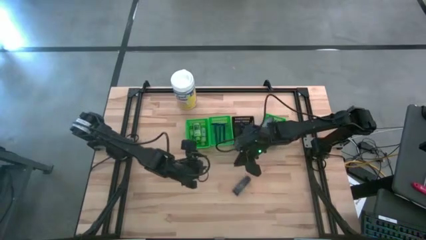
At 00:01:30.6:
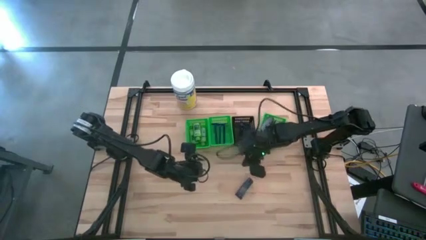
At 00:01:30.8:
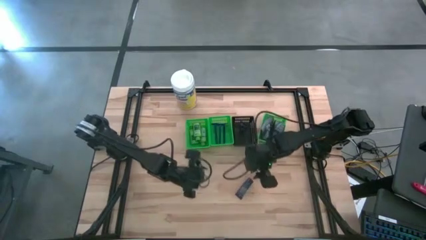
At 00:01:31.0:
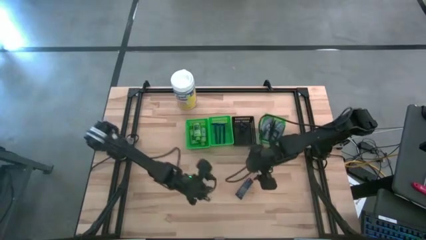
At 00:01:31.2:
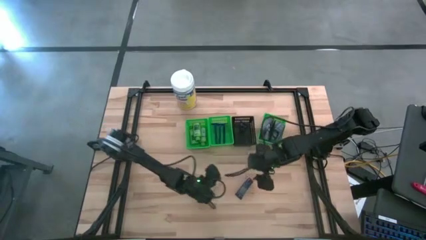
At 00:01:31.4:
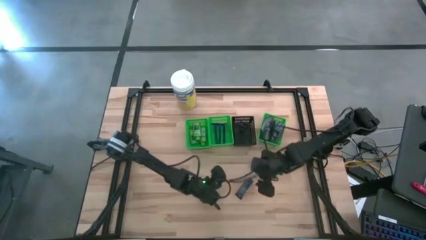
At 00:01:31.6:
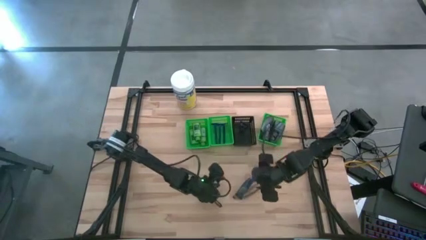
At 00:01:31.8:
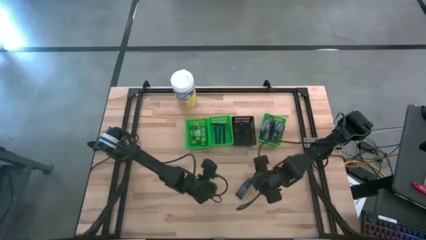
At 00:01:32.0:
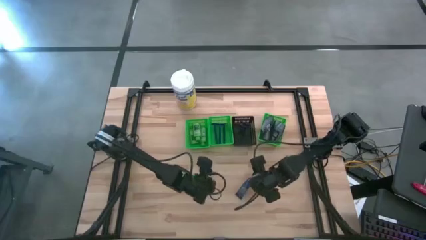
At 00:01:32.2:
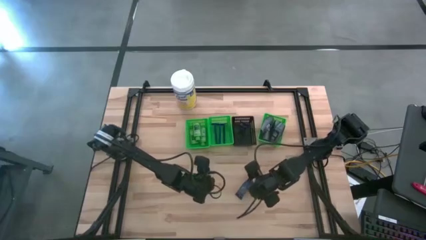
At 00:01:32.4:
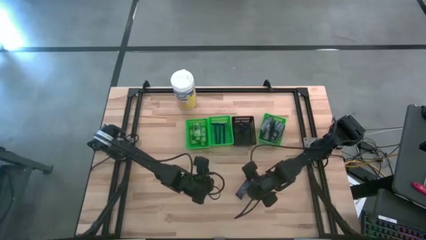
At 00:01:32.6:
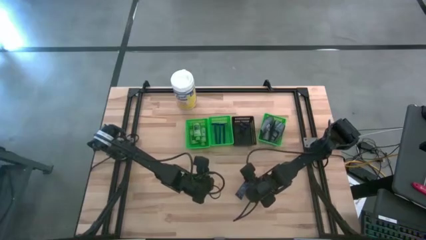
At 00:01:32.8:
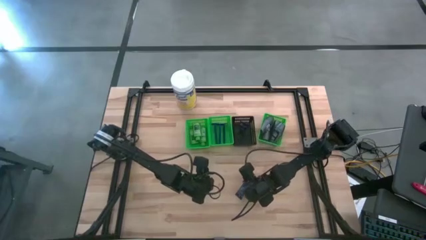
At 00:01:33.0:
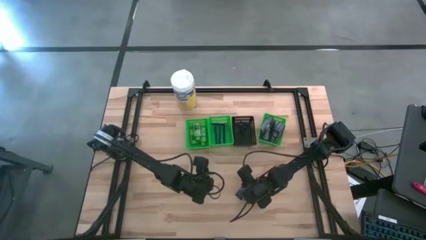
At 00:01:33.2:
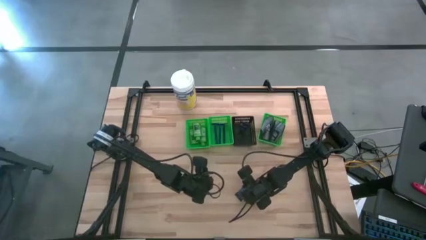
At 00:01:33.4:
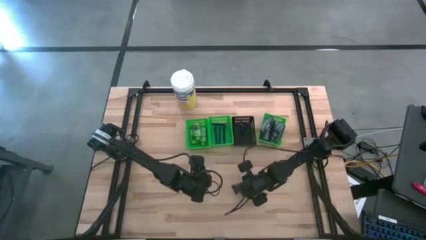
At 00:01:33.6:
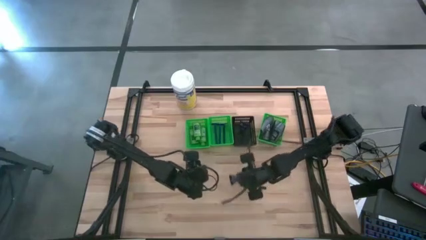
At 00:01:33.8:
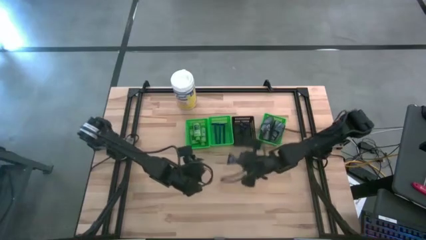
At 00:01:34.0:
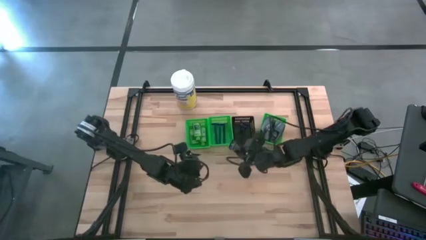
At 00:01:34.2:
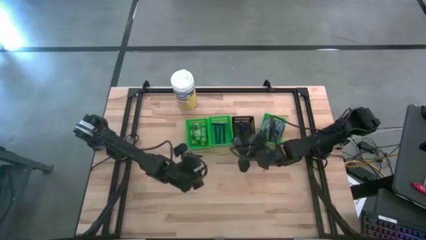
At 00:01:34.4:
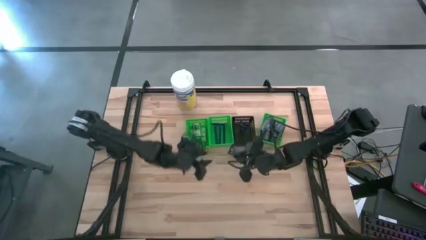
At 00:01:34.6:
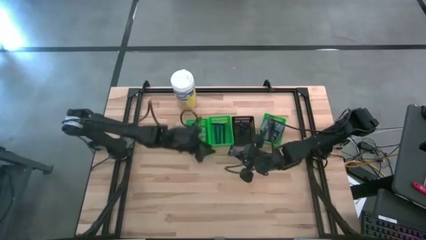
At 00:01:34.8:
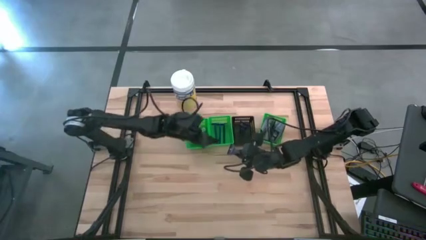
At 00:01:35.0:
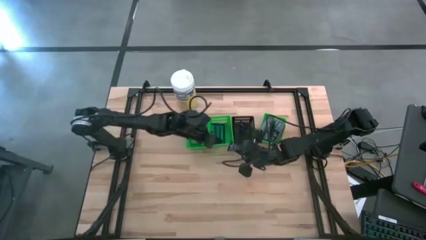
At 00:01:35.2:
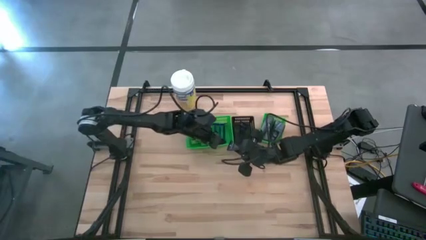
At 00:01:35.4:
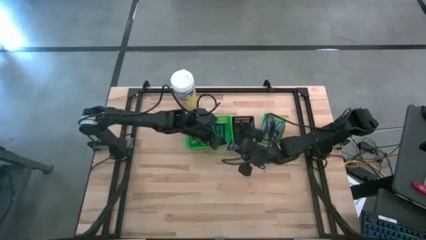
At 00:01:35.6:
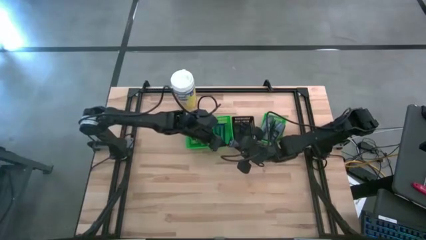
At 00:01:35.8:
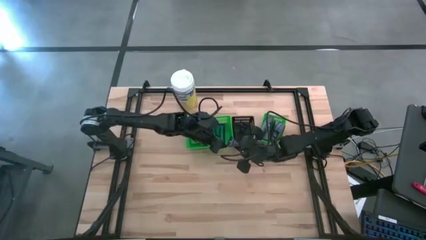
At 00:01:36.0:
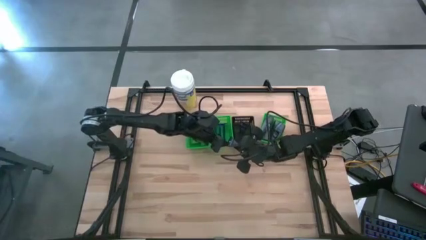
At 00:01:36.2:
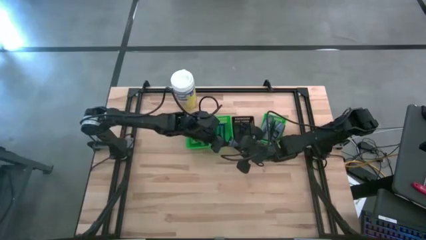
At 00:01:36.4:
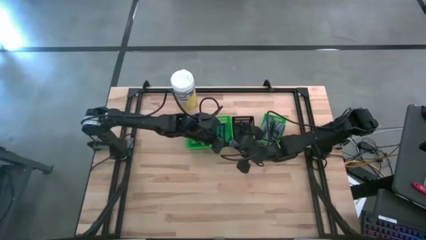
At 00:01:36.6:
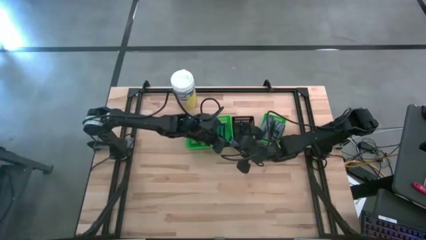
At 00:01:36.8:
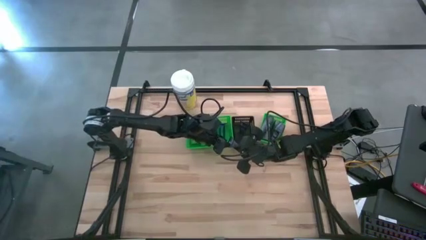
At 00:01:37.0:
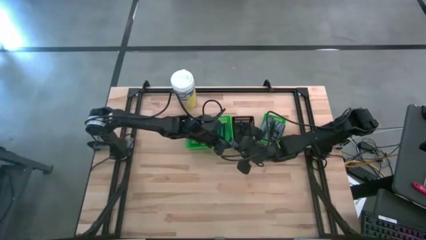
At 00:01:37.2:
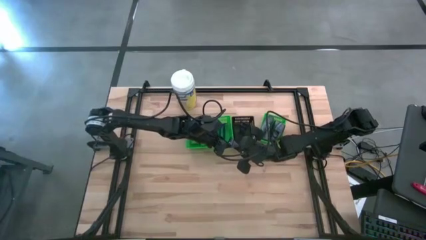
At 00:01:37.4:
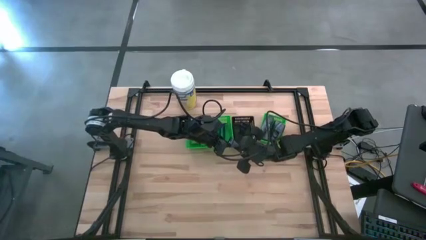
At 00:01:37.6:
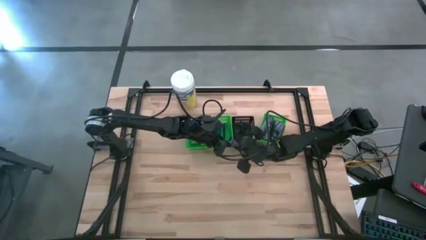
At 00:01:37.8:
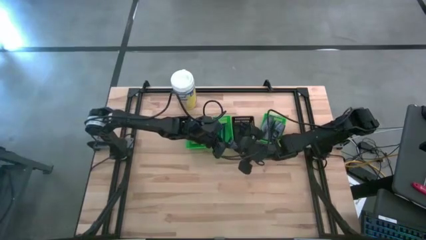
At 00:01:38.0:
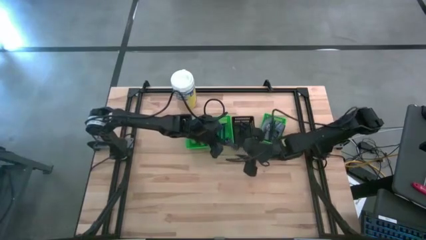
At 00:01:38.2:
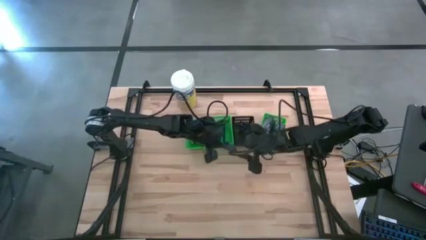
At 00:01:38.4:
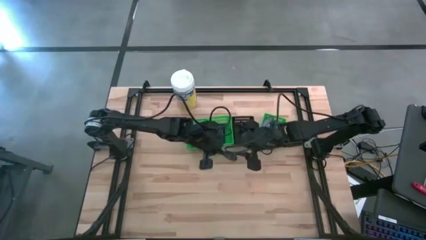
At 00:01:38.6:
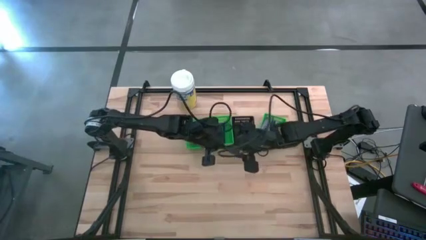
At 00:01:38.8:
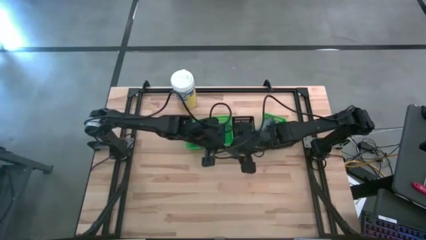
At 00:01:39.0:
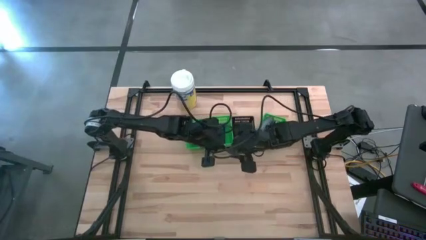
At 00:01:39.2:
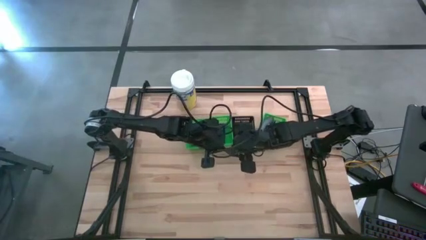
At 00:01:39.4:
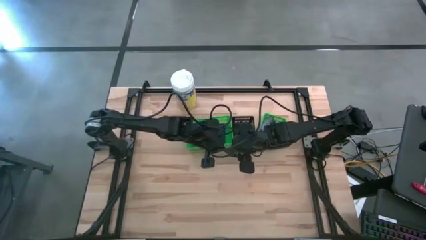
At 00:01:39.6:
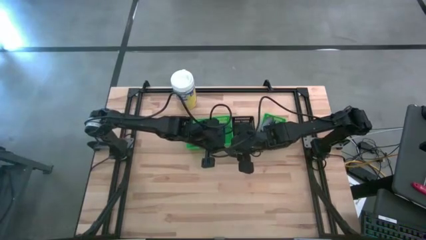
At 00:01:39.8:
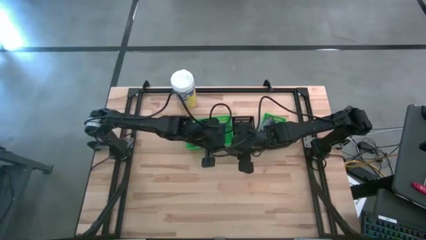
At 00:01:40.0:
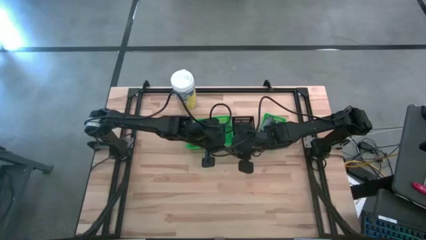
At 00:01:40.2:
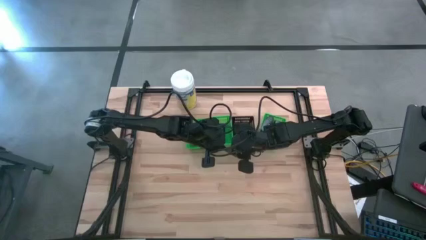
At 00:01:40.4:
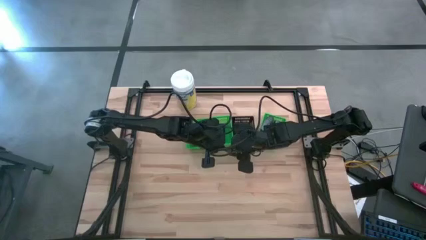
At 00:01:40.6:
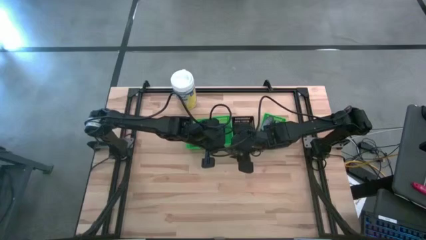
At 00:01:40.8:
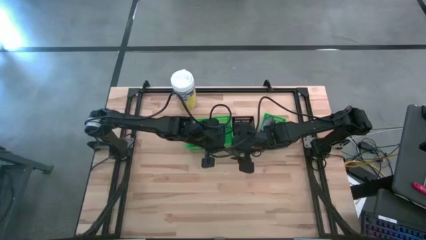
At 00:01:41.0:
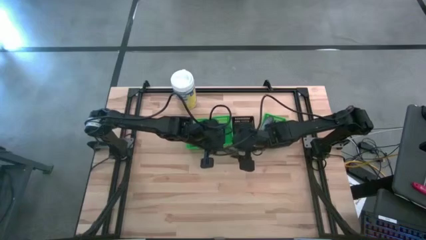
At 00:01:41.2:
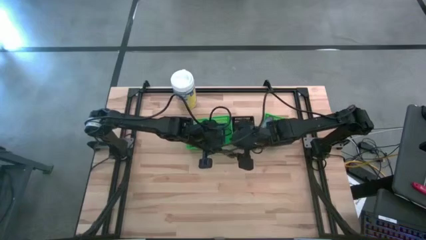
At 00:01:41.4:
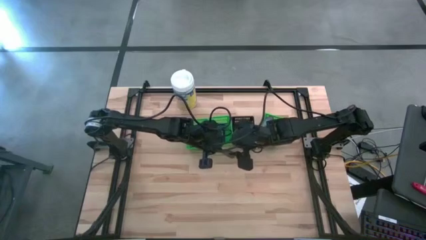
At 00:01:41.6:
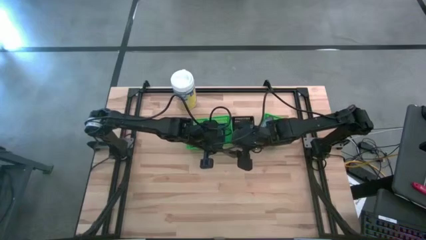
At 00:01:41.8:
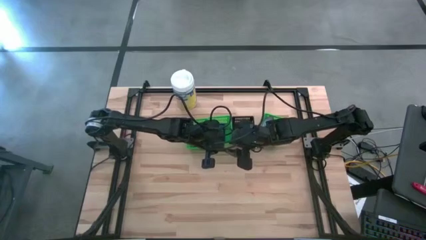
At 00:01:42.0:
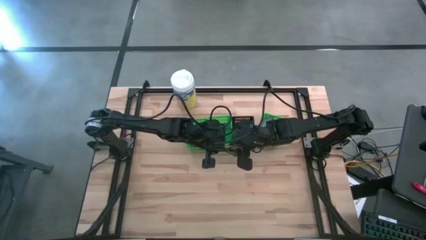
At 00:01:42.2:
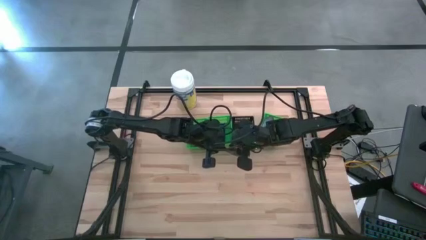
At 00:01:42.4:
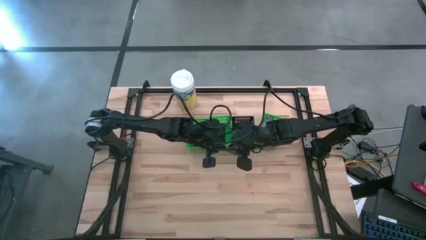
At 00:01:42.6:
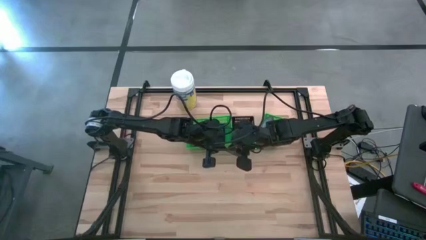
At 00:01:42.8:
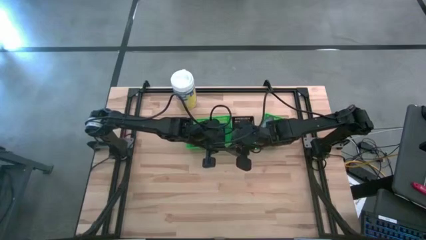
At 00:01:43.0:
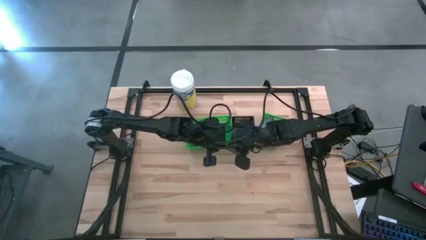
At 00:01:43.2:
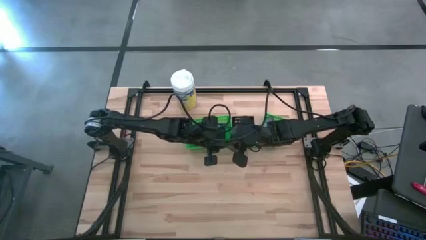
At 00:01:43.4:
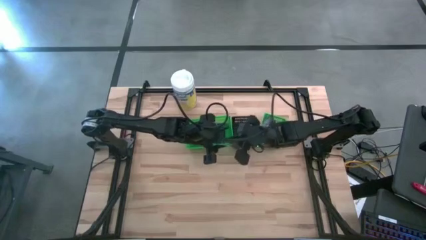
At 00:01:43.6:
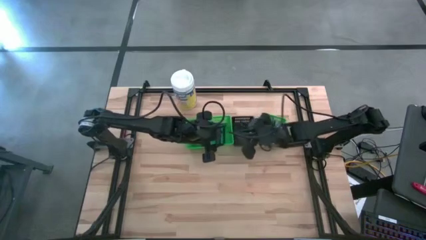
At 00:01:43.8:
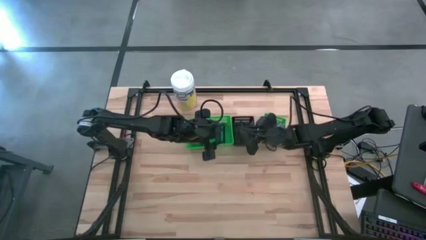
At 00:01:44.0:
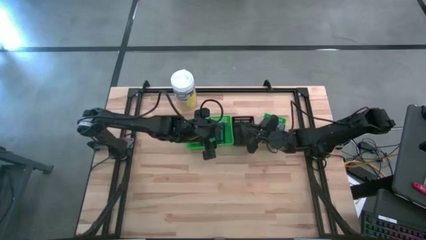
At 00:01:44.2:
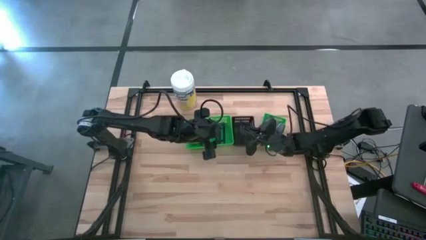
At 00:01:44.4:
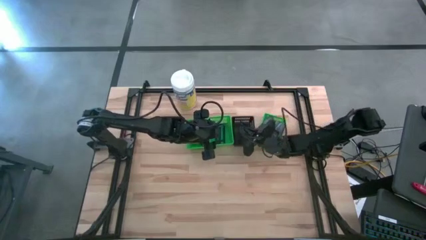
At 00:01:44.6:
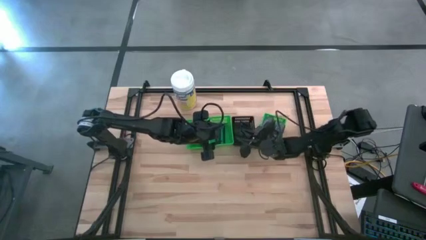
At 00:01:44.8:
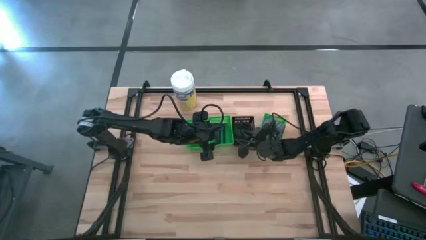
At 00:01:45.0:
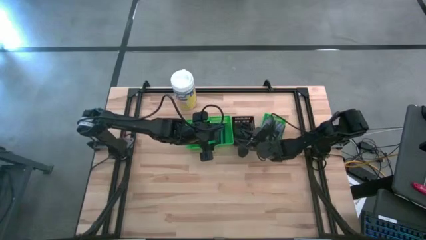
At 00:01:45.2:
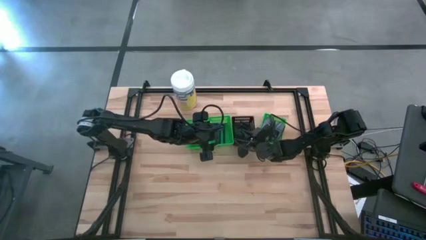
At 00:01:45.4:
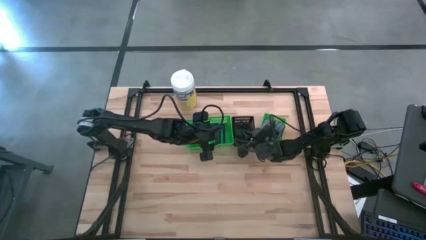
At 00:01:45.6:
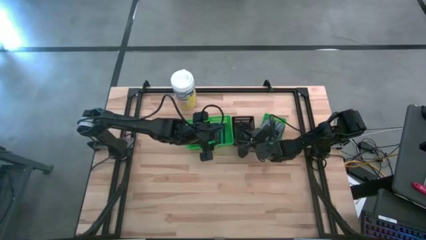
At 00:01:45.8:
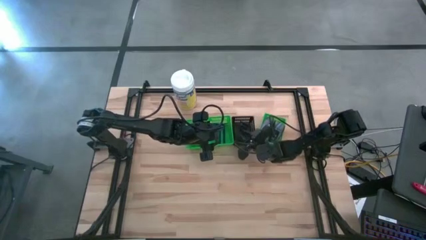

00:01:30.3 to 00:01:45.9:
Task: Pick & Place Travel size toiletries
Put the shaving cream into the black bin
